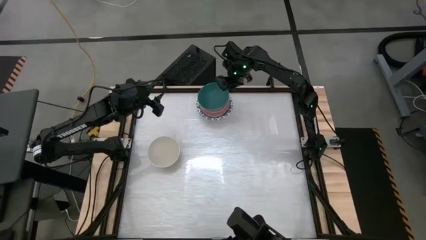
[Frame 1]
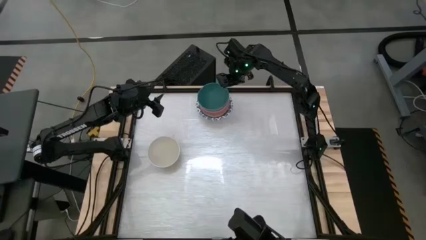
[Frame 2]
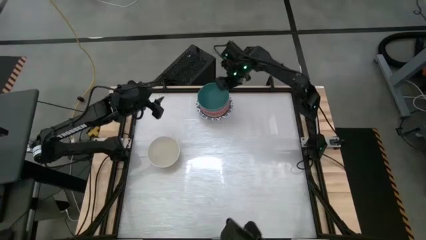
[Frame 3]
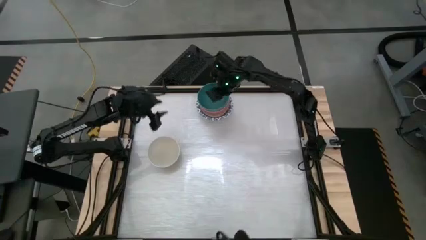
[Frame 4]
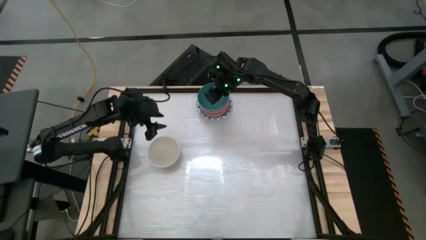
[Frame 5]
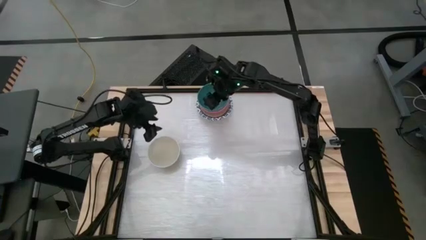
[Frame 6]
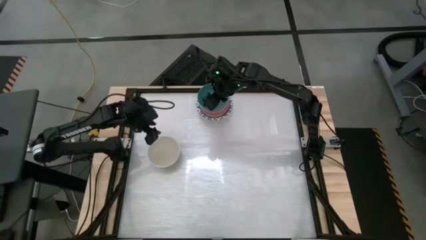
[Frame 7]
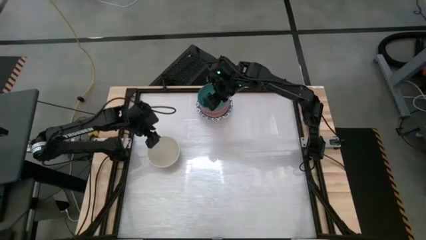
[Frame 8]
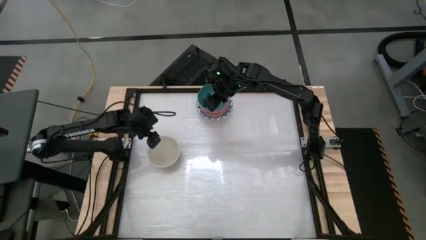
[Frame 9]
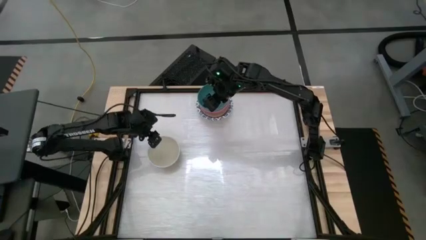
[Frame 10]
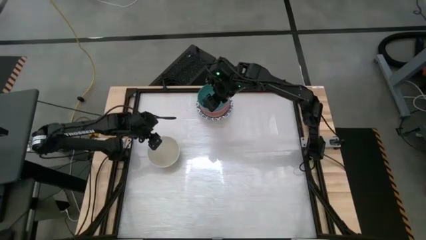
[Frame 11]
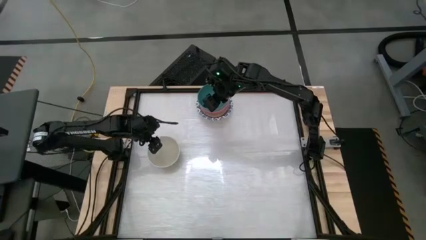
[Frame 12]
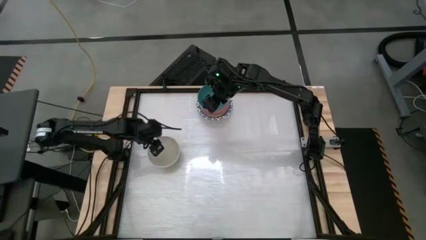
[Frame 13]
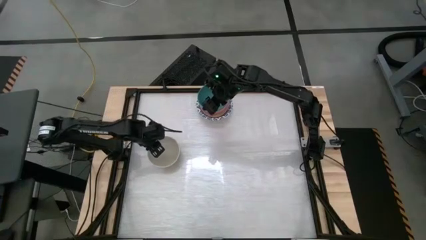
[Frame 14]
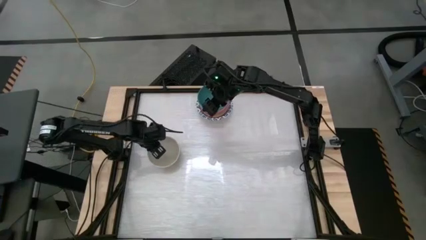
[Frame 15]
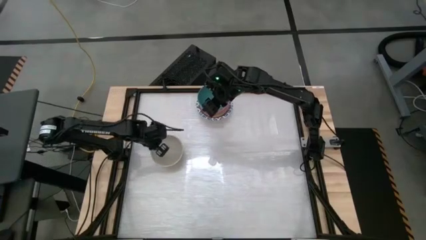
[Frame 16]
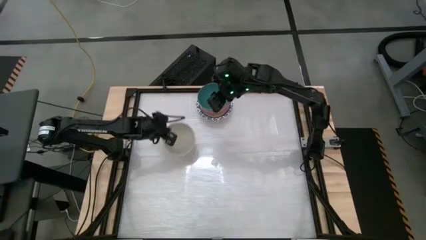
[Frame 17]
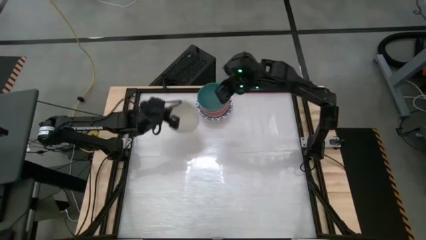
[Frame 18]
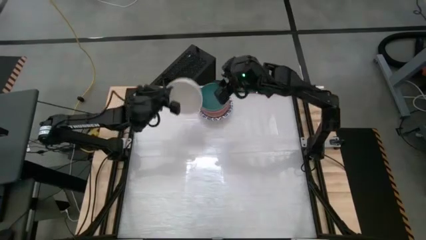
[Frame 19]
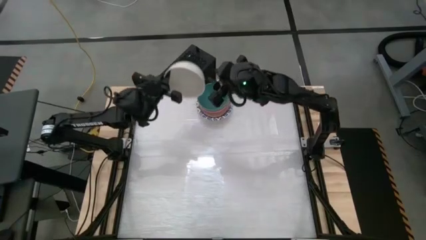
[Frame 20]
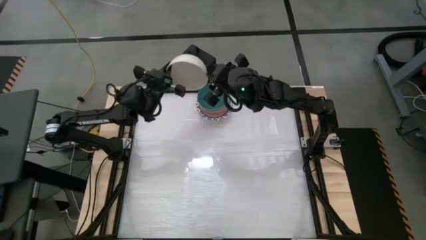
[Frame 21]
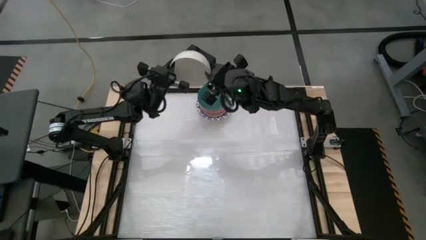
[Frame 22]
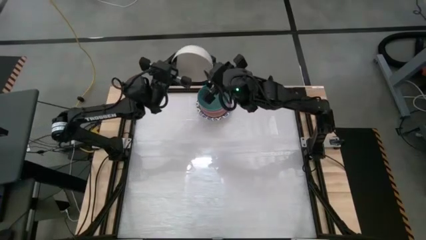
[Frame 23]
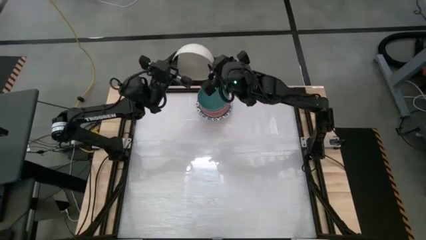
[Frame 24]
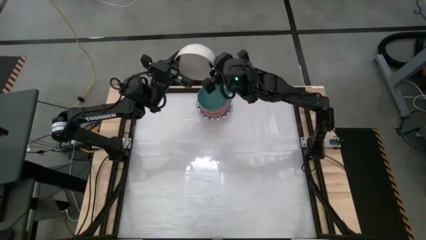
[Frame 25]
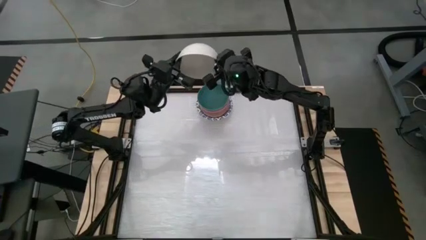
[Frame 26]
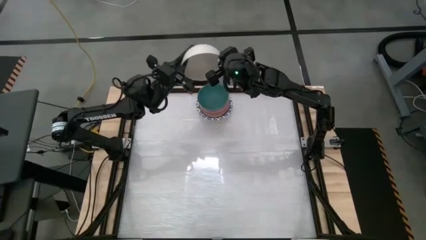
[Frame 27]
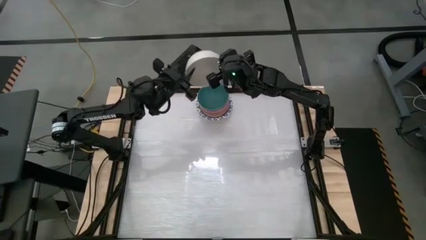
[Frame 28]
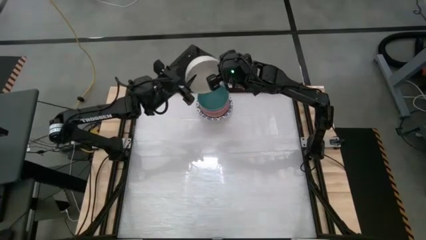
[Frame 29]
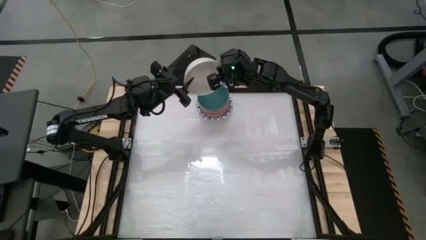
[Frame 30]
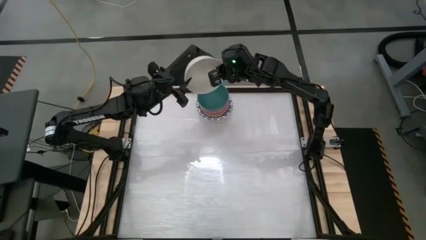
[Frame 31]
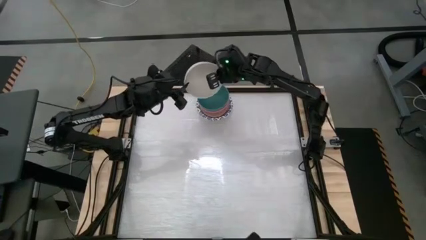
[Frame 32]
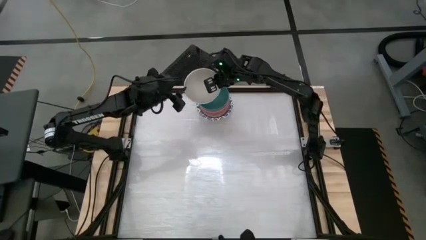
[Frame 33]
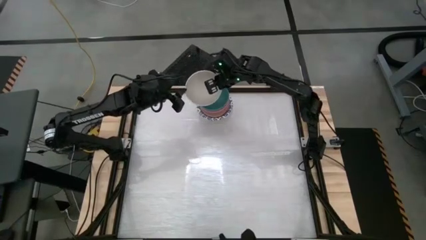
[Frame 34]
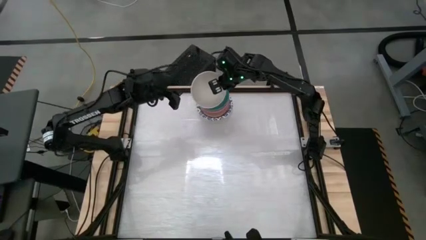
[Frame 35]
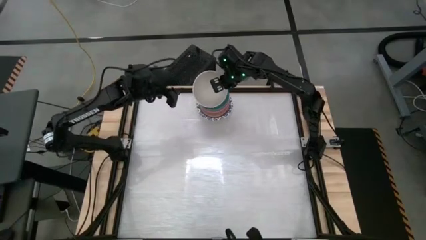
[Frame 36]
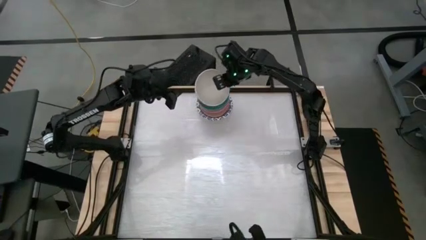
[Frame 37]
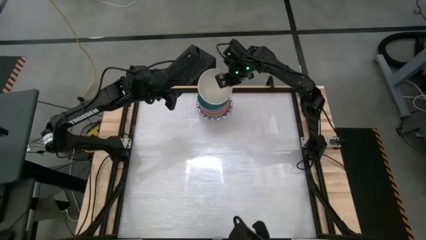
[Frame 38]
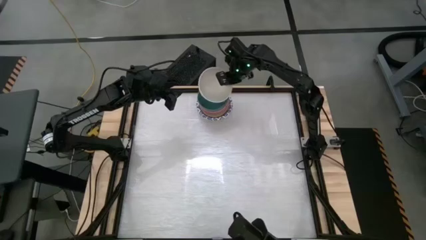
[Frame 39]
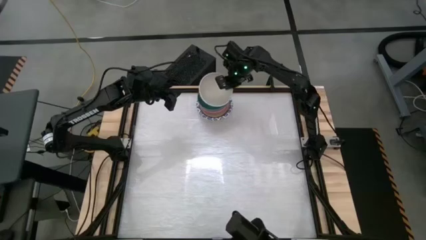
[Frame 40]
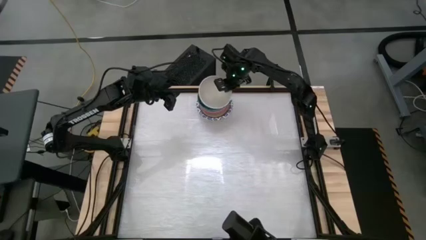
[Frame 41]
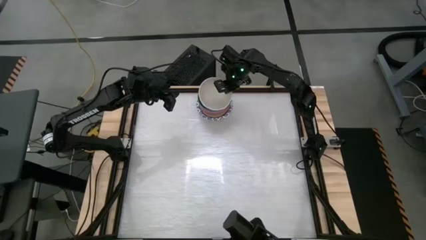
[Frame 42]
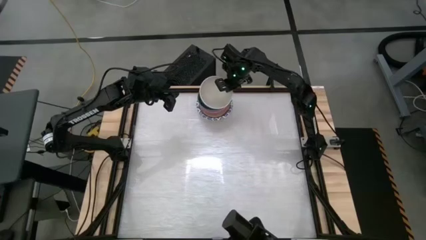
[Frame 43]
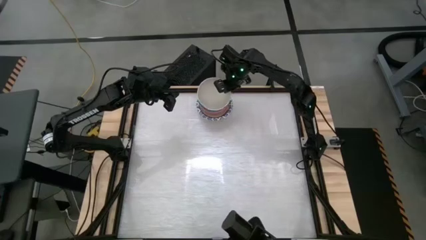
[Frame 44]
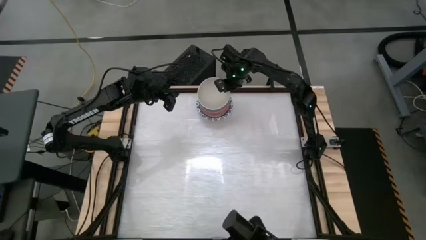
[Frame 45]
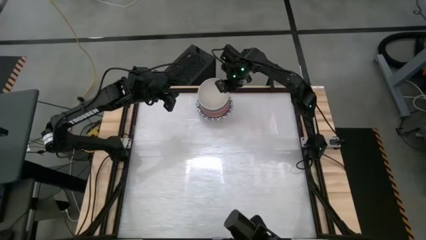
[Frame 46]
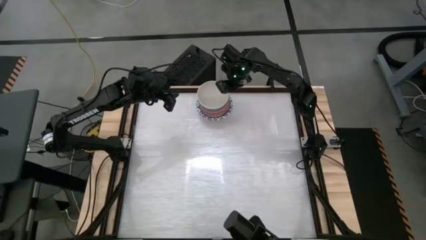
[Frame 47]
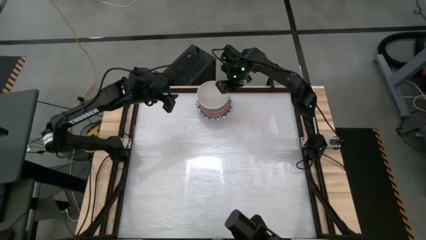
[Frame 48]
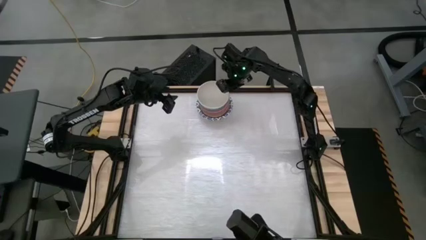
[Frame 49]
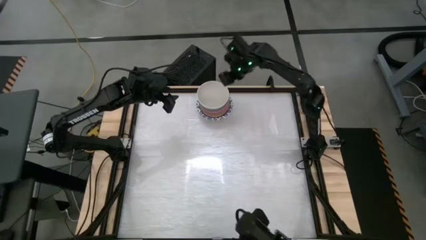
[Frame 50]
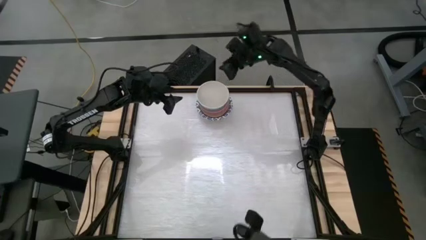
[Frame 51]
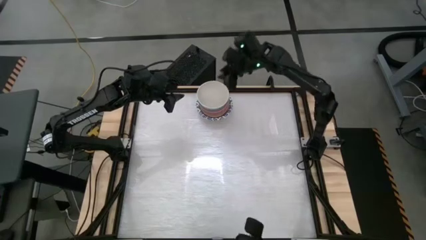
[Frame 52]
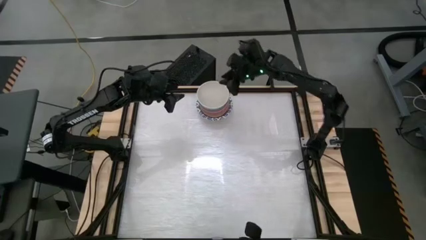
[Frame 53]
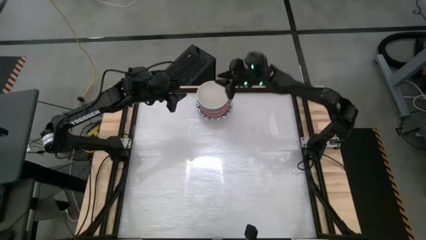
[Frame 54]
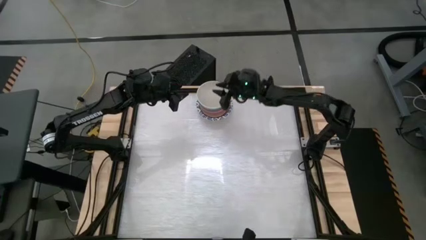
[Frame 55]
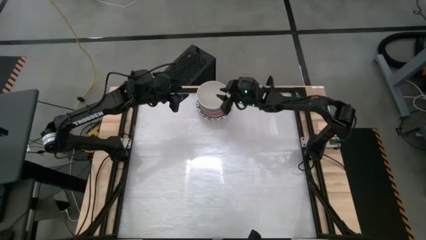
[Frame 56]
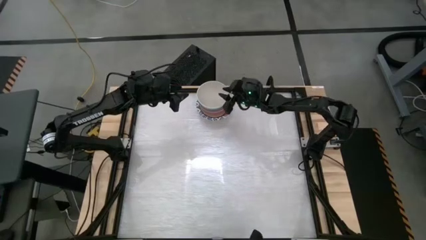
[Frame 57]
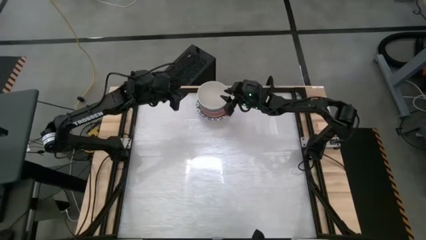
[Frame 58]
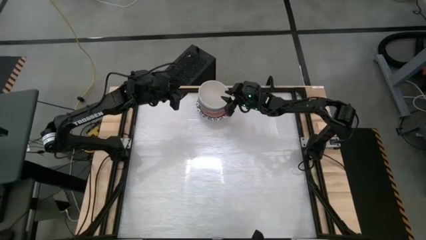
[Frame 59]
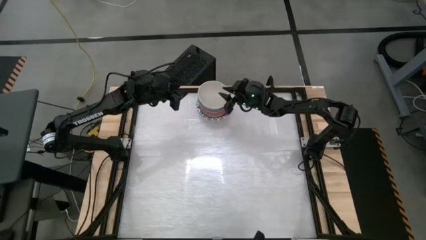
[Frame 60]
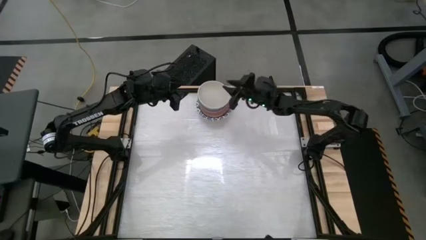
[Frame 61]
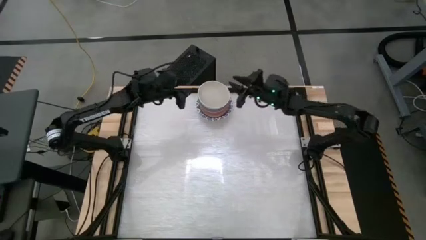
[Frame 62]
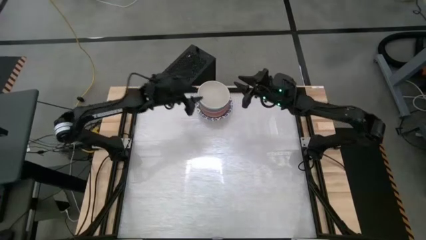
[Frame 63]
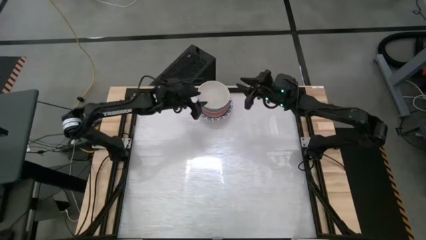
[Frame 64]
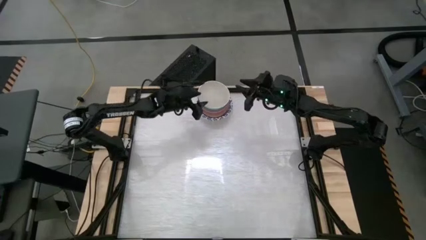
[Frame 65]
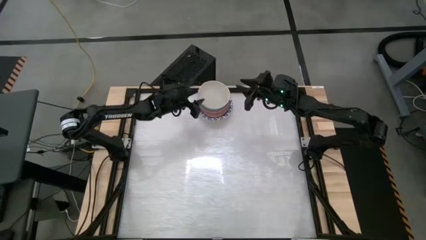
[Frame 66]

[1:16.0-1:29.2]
Task: Nest bowls inside each other by size order
Stack the white bowl on top of the dark green bowl

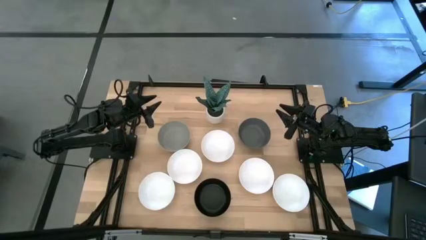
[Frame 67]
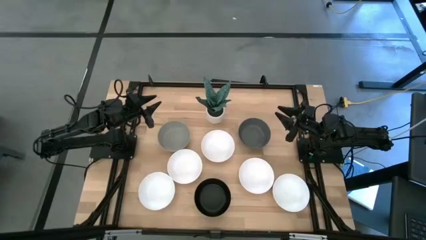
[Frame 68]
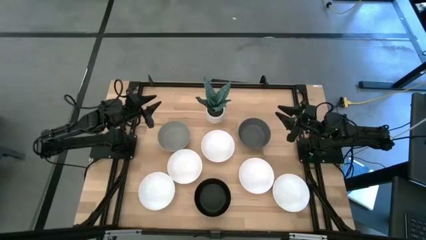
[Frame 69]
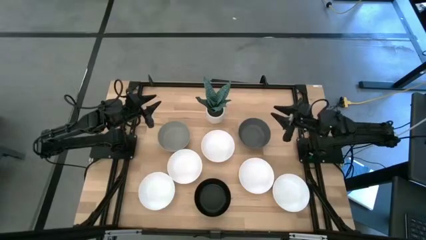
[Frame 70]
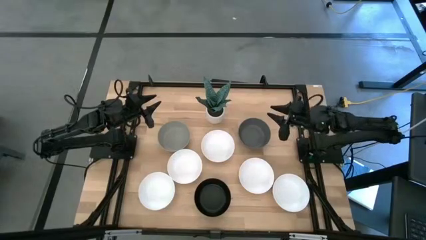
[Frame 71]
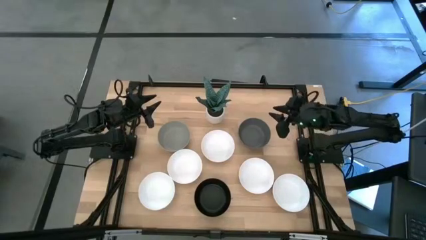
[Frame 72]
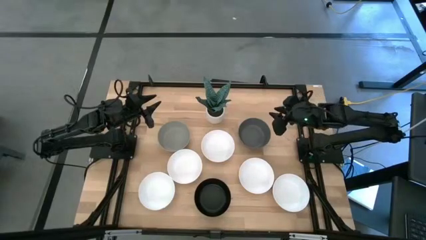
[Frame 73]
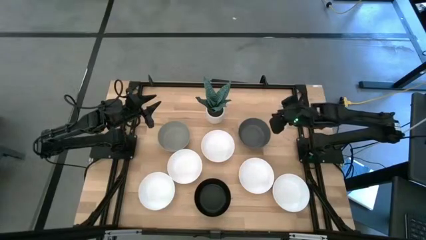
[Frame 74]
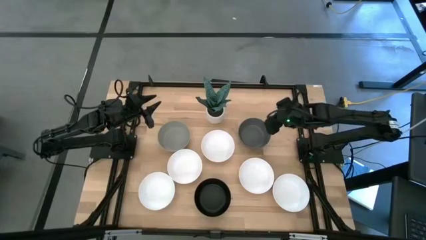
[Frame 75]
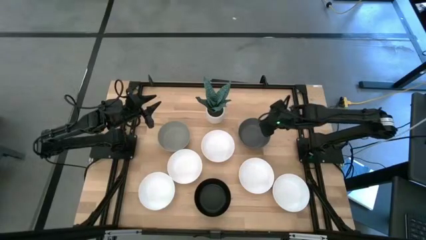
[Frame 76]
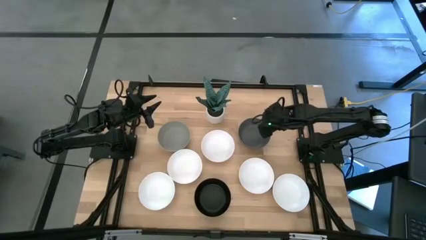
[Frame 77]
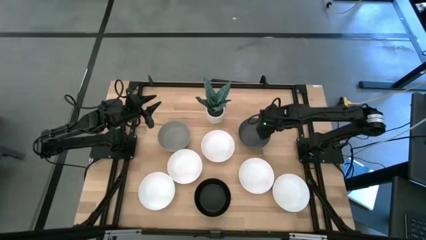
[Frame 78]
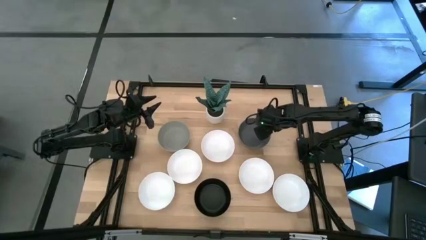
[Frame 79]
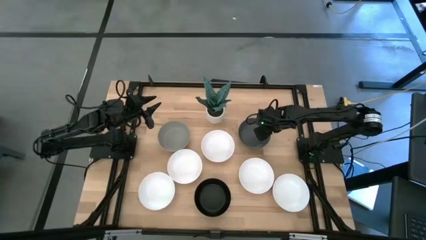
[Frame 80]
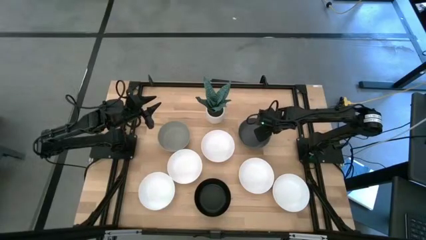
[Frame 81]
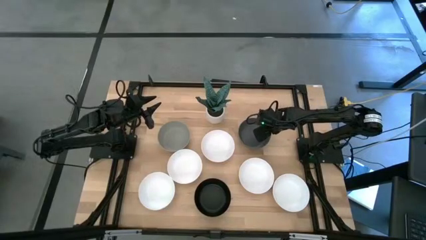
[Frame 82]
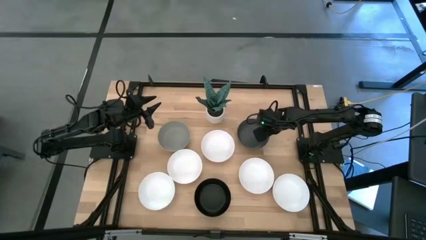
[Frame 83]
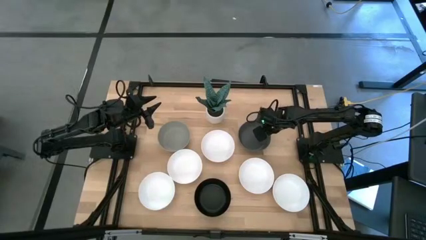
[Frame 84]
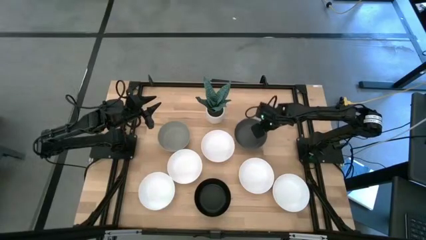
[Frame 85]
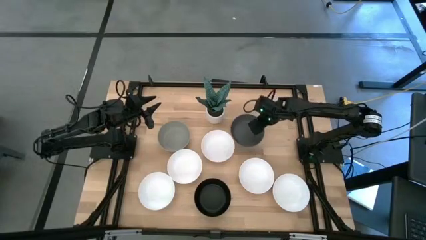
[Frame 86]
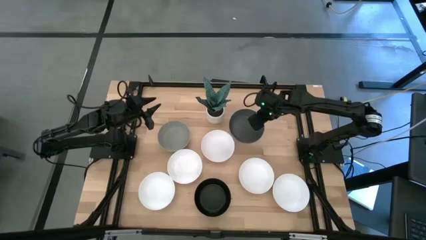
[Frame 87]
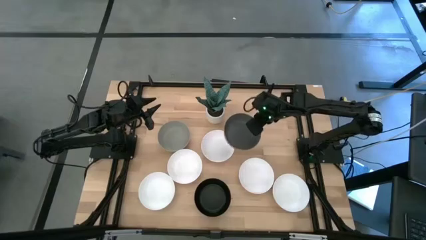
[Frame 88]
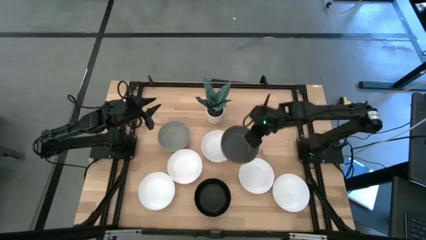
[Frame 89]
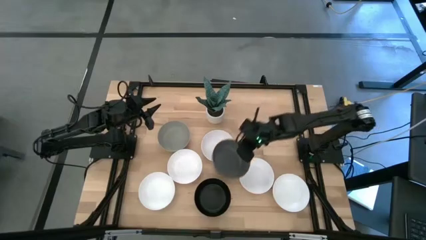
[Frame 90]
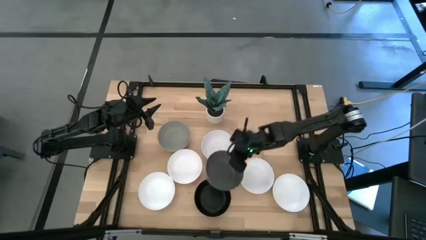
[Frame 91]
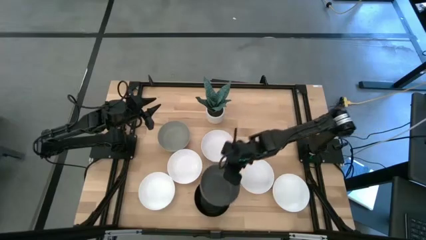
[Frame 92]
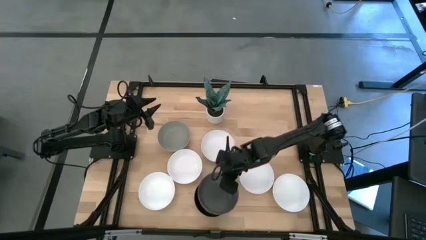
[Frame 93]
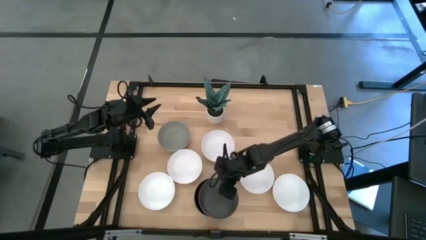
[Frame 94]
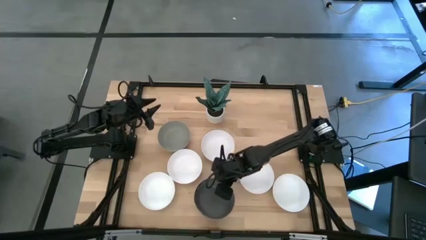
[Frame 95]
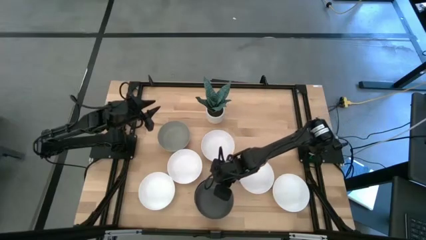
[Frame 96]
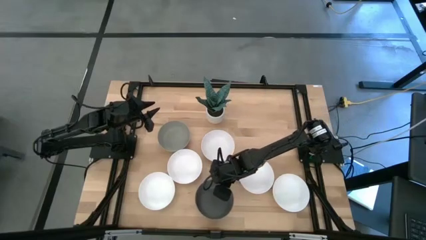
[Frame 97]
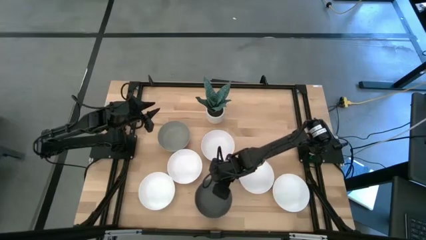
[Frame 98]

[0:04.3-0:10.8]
Task: Nest bowls inside each other
Stack the dark gray bowl on the black bowl
